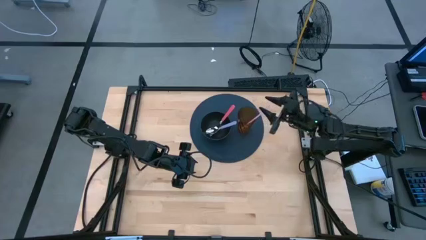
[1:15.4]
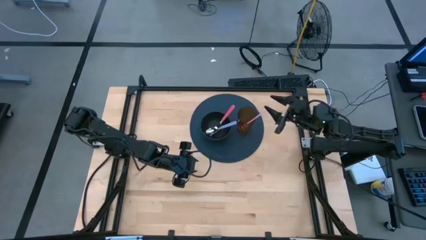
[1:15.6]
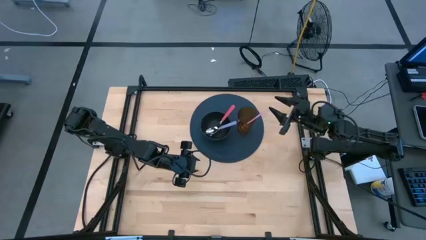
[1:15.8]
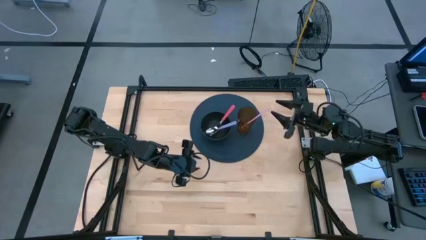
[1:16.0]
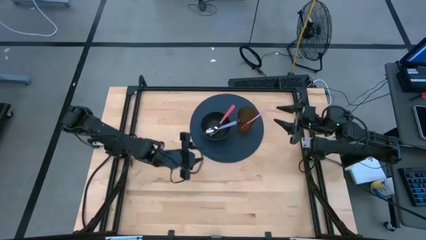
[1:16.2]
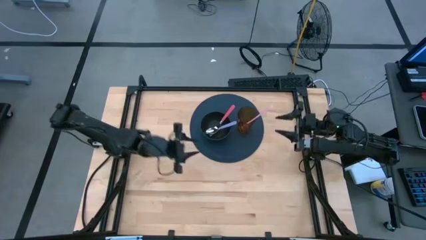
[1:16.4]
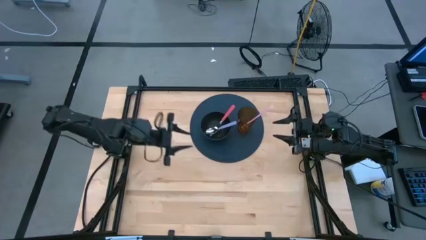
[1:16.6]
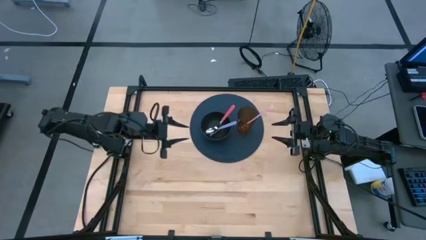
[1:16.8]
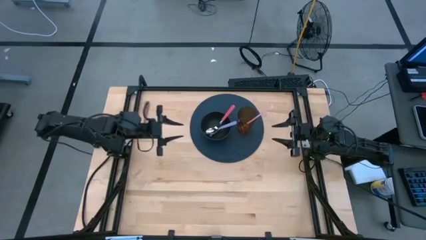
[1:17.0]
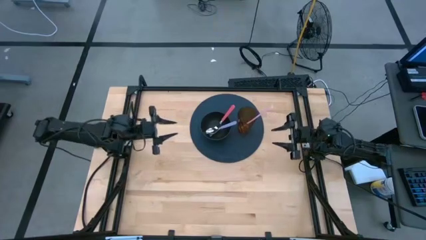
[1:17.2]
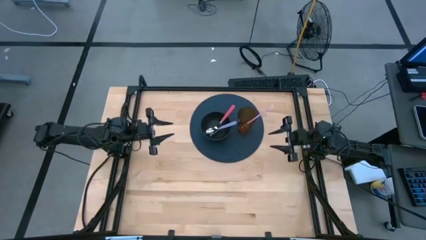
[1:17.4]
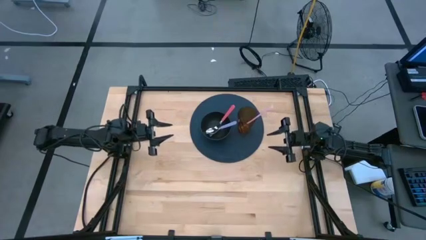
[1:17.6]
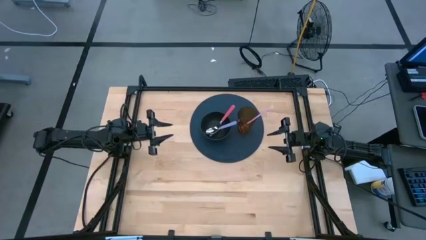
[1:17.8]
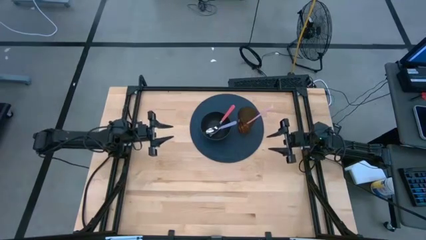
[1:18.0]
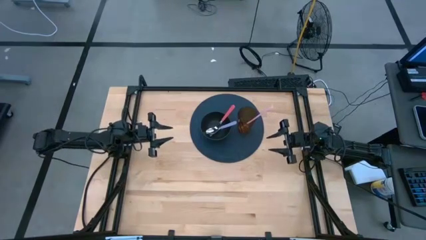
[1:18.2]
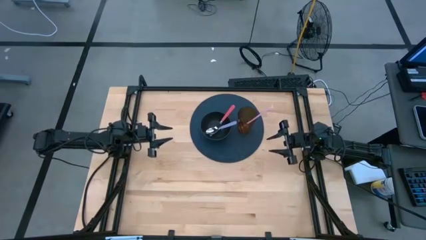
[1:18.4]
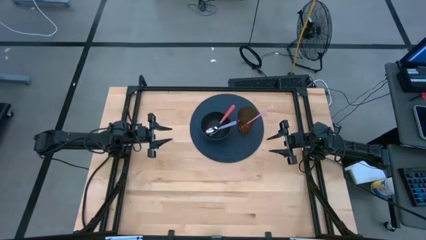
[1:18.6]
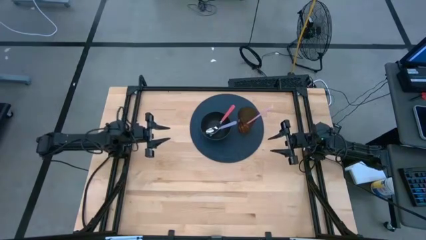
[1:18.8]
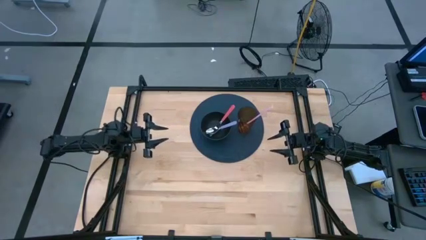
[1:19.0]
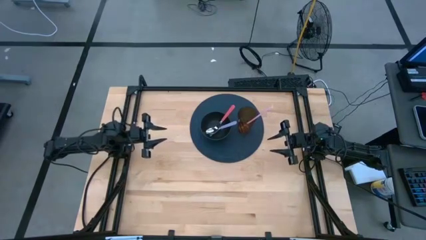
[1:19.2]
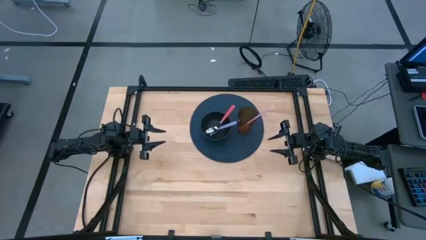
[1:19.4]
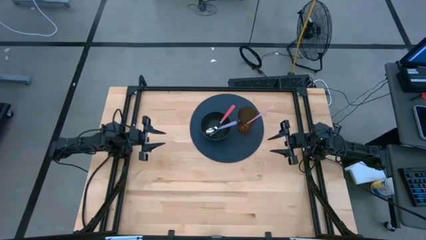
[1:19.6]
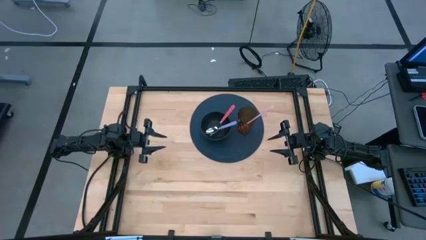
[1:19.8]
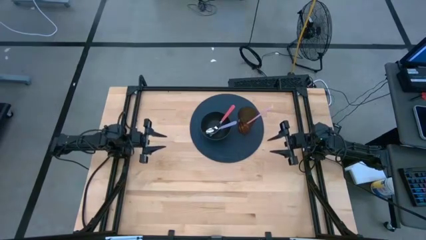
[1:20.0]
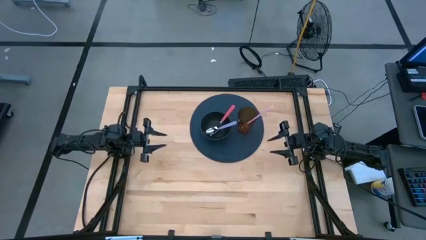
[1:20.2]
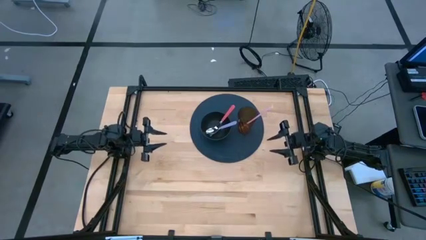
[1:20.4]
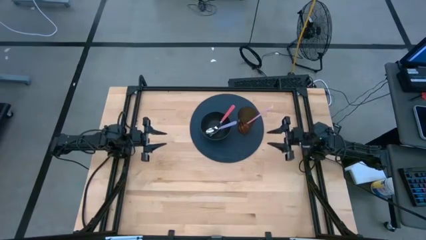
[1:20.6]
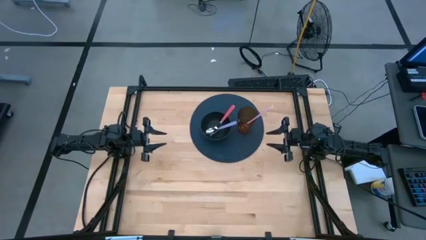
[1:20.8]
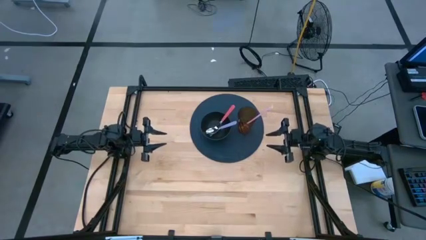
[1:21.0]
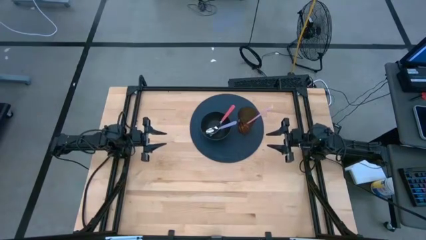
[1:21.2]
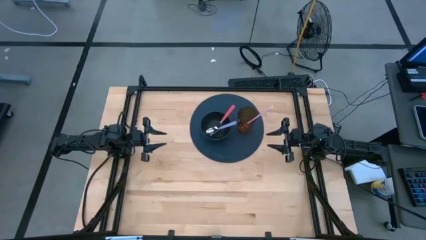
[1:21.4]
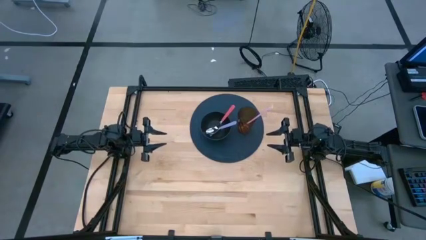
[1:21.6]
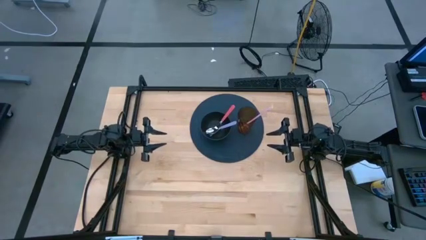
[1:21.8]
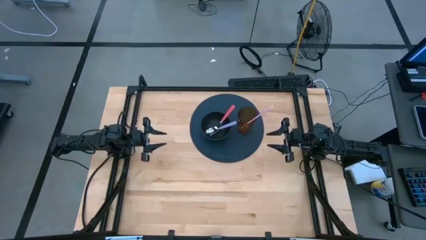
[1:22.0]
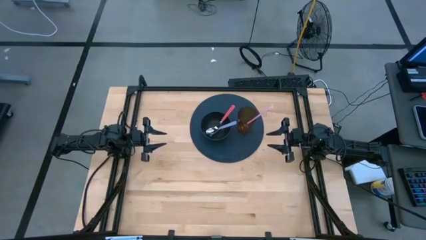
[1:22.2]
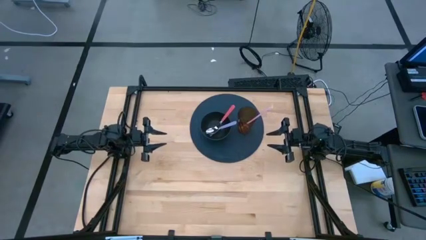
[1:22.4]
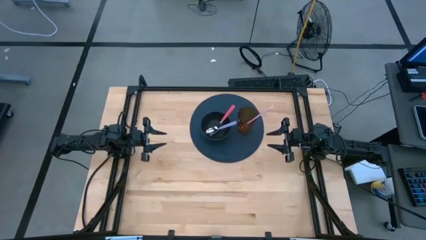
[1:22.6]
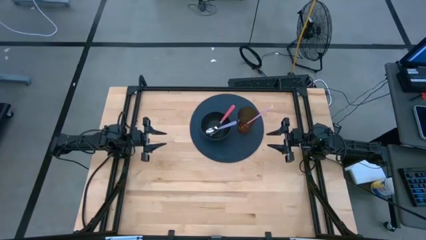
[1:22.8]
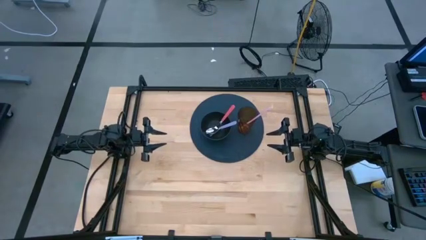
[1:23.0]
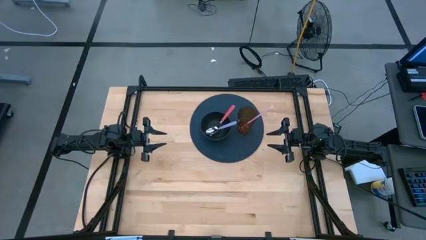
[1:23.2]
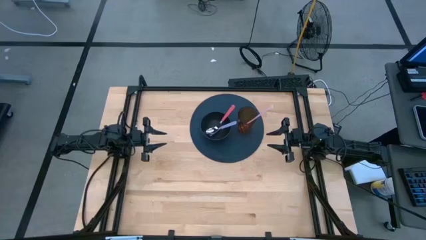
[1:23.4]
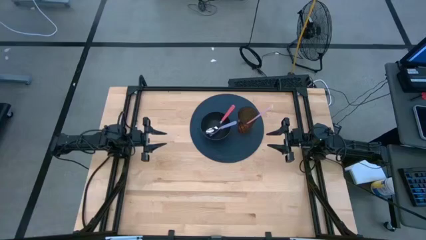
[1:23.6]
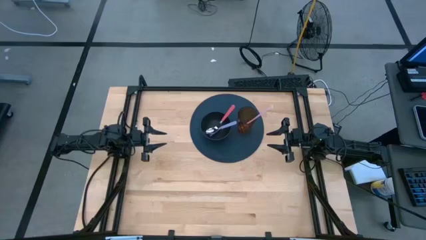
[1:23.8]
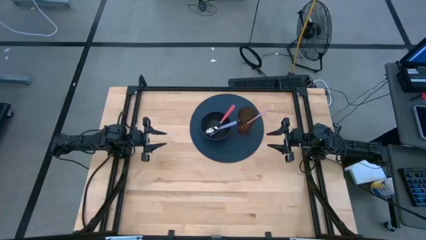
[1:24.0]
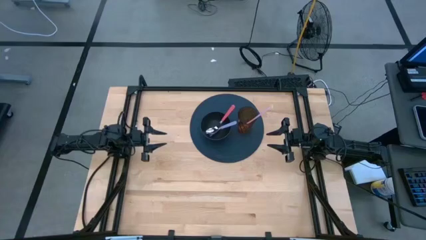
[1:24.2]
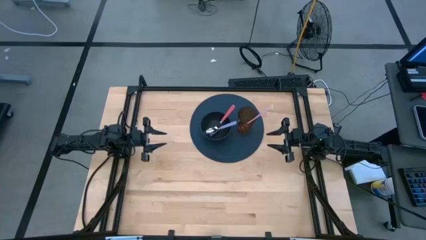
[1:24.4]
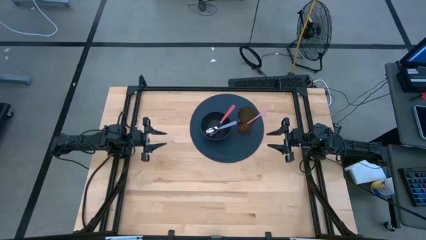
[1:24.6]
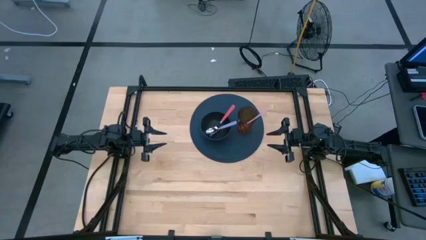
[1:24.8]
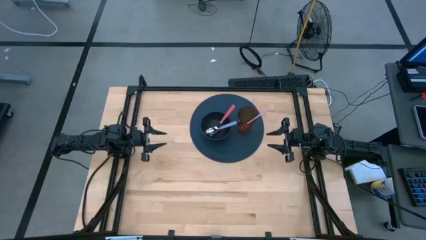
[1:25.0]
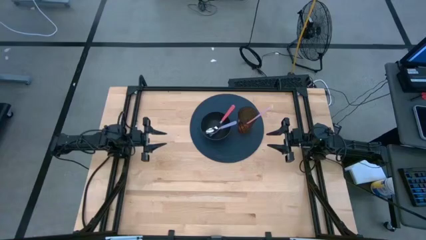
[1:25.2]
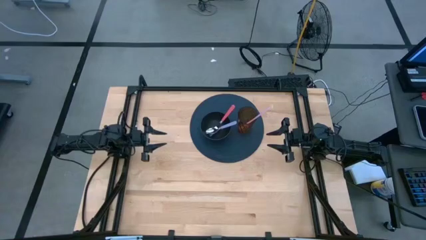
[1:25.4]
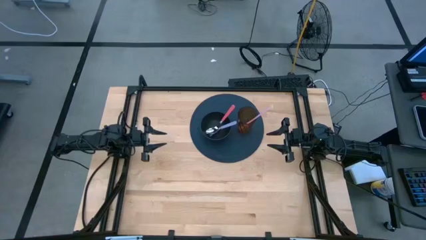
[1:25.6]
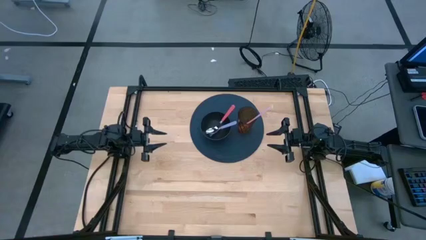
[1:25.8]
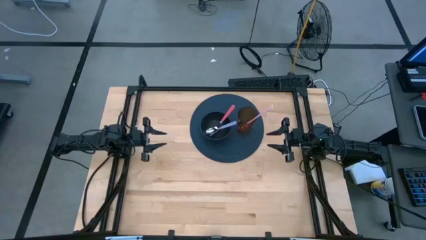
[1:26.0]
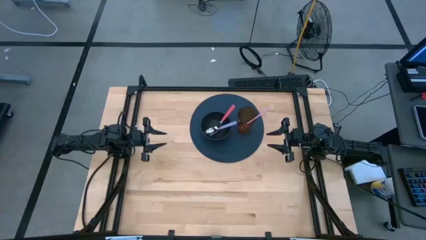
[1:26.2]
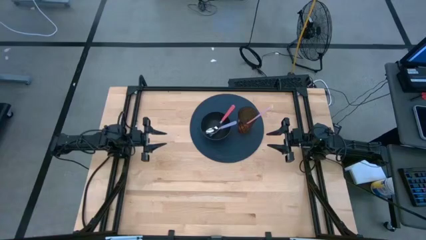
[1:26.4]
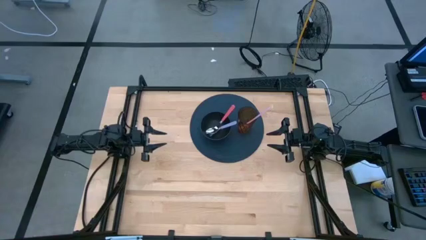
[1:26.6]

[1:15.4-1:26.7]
Task: Pick & Place Utensil
Return to Home Position
